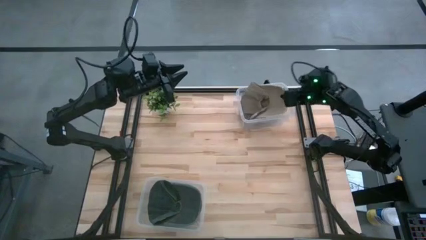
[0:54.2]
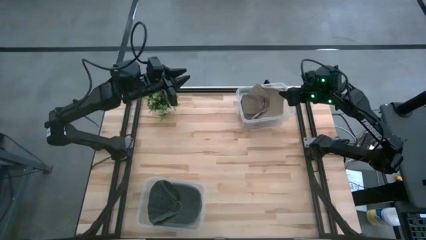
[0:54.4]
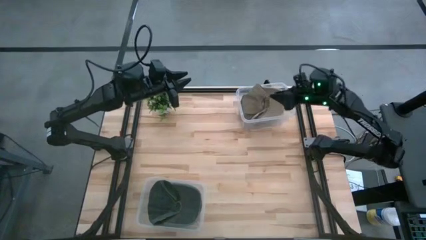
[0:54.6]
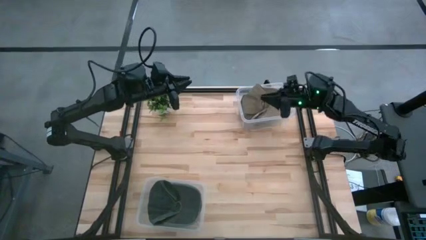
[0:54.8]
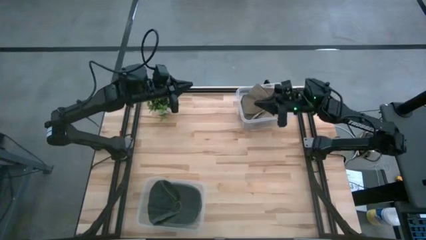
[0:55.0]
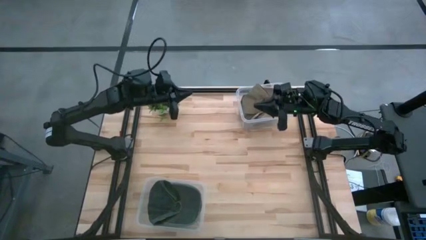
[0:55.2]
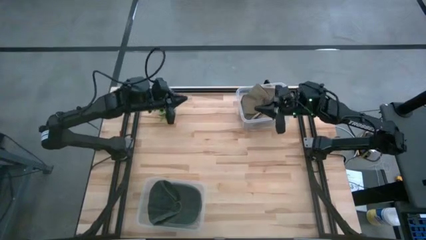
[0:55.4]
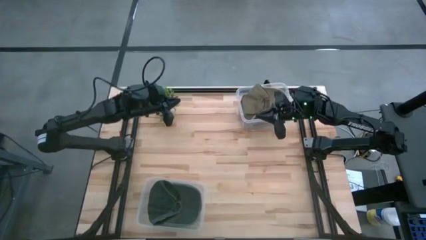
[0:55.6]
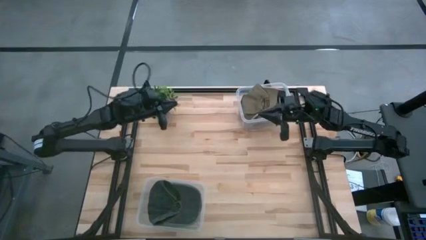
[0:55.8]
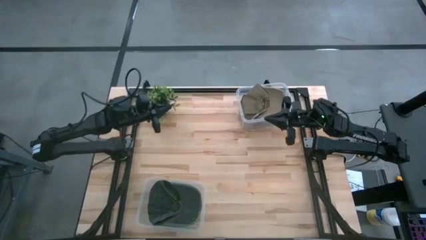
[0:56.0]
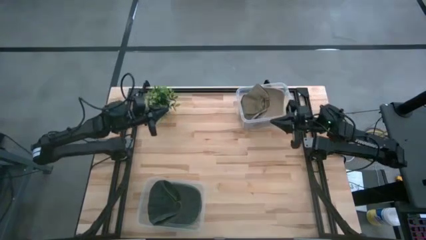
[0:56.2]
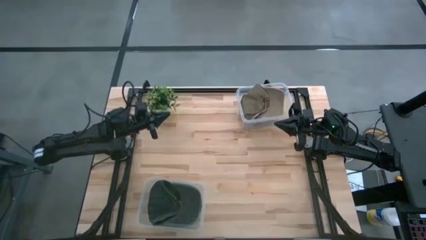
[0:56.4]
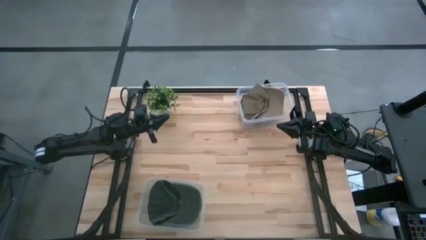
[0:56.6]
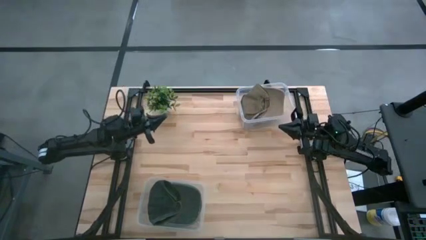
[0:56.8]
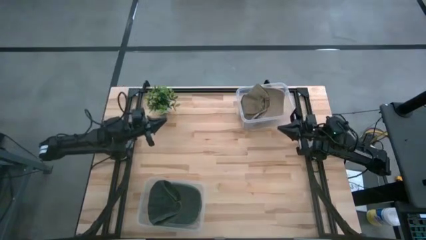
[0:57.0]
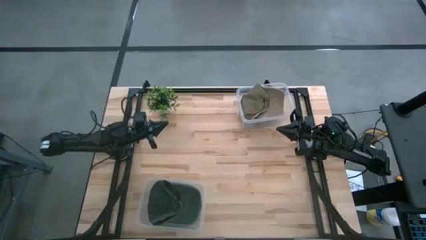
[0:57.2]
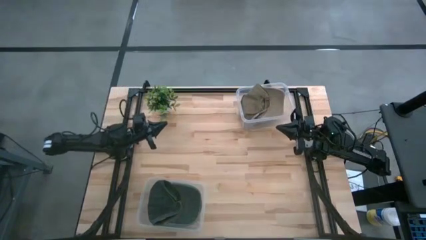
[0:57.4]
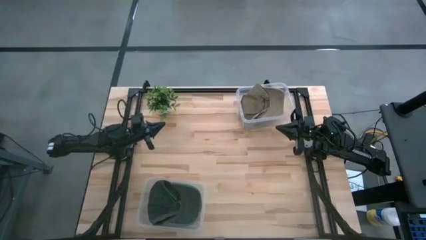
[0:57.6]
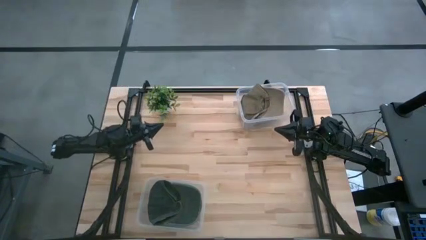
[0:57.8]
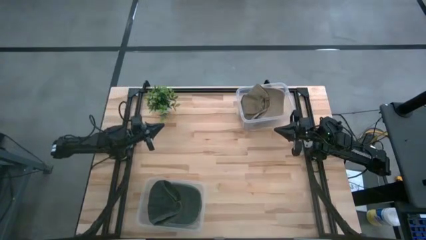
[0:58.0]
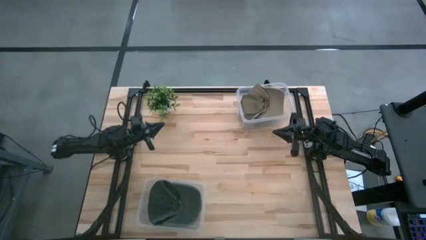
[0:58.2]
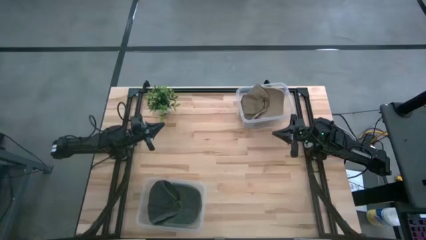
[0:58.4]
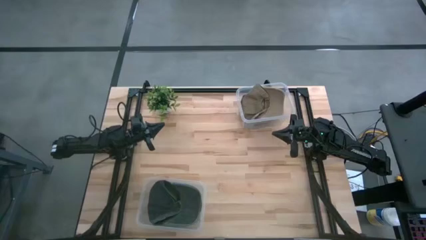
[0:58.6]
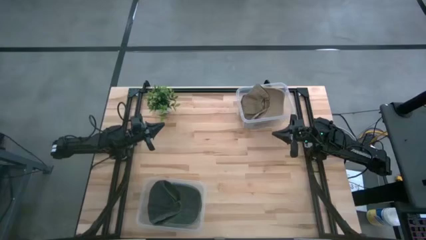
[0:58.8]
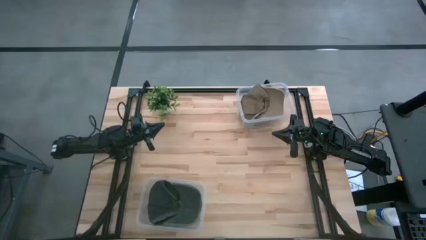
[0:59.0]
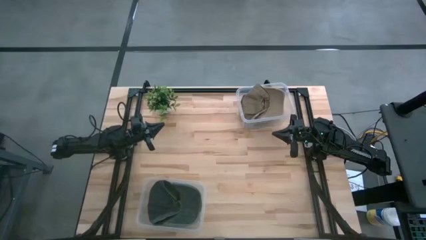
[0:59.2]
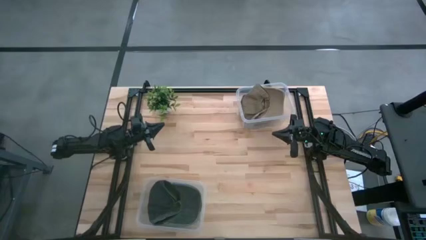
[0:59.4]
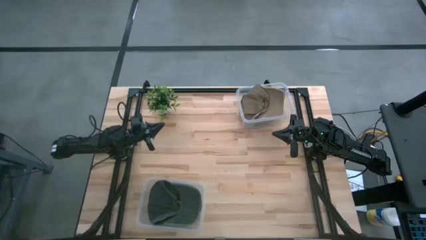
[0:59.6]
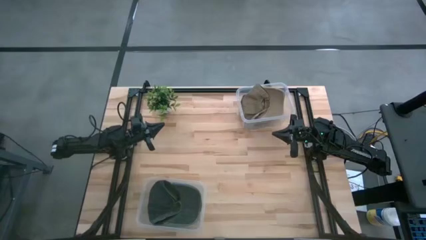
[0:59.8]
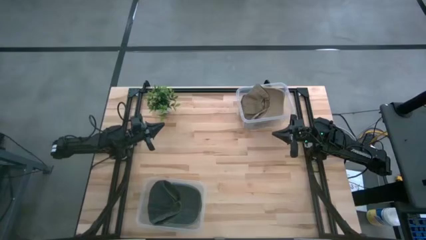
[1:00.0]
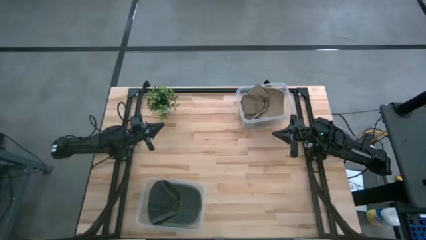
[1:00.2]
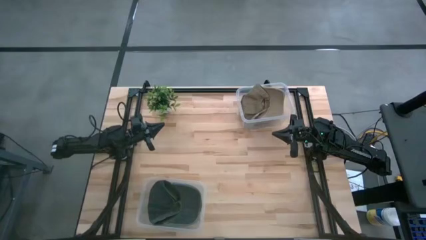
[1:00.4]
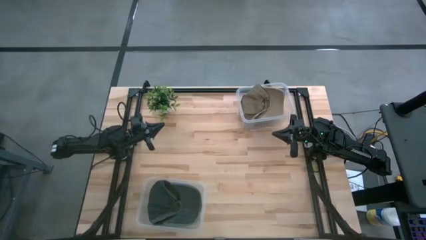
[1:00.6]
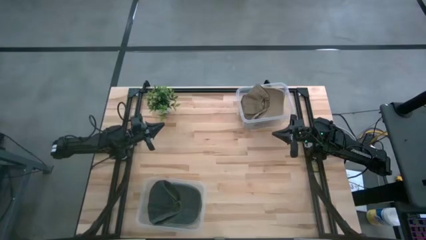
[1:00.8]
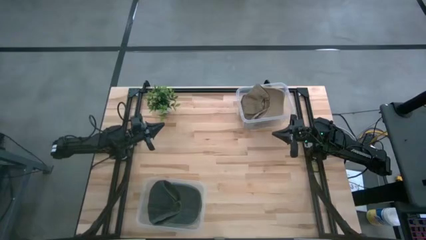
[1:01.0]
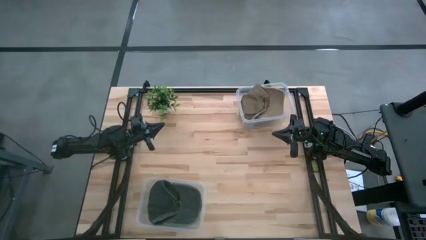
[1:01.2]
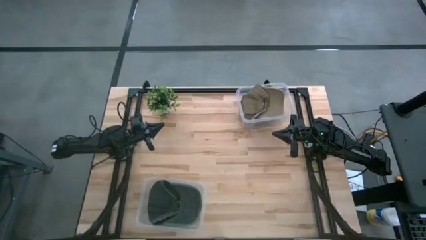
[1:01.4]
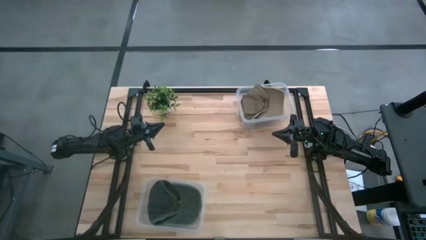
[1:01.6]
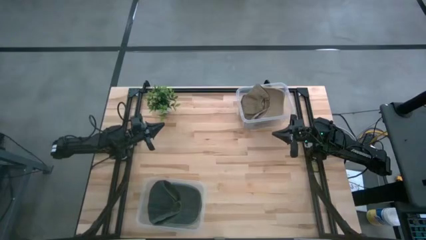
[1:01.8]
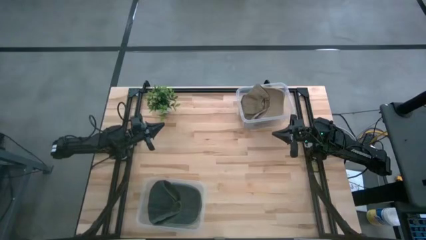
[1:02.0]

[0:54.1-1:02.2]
Task: Pick & Place hat
Return to Home Position

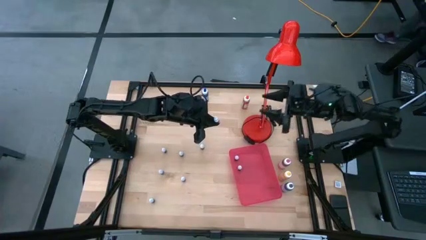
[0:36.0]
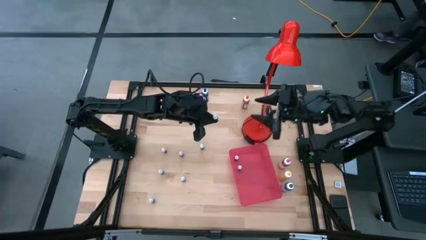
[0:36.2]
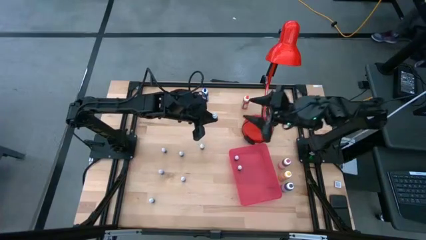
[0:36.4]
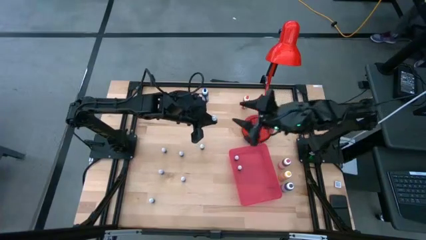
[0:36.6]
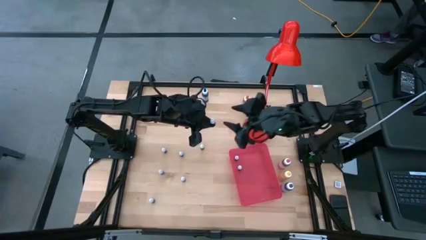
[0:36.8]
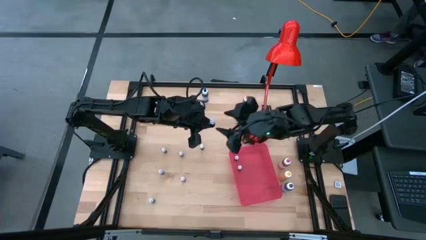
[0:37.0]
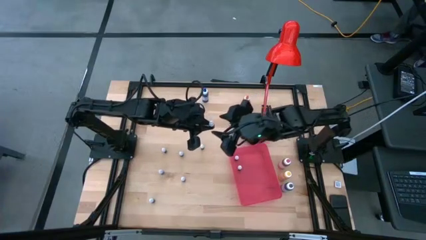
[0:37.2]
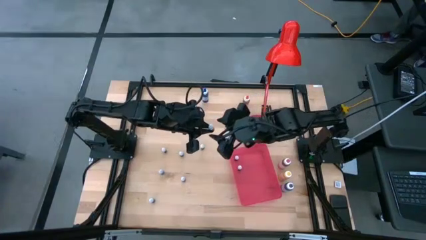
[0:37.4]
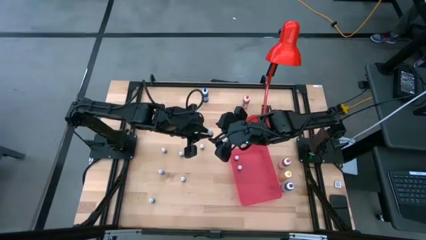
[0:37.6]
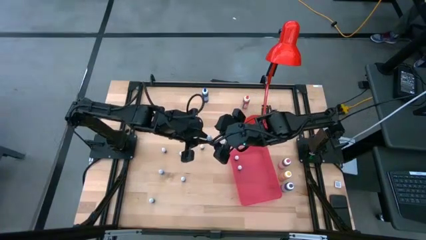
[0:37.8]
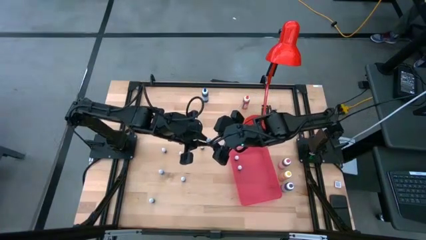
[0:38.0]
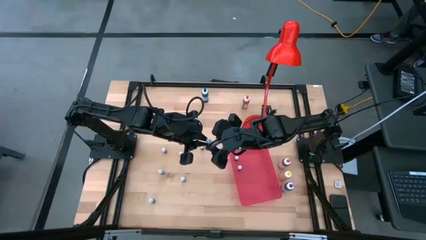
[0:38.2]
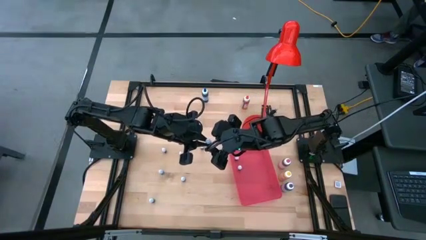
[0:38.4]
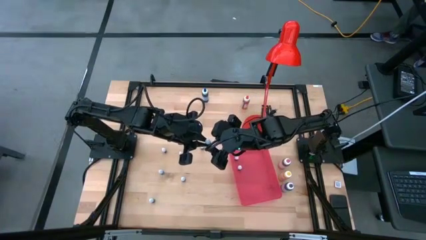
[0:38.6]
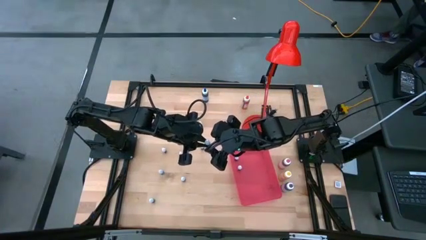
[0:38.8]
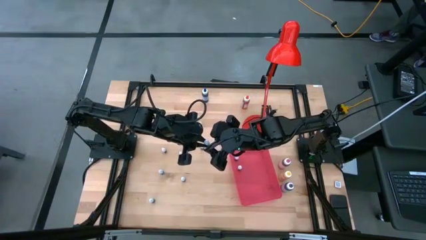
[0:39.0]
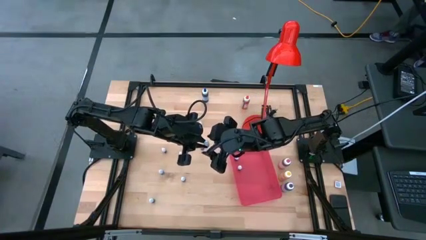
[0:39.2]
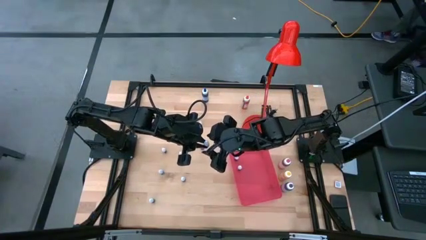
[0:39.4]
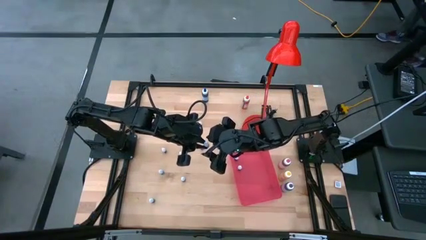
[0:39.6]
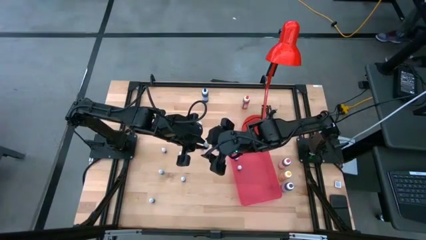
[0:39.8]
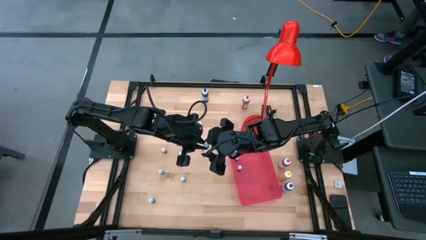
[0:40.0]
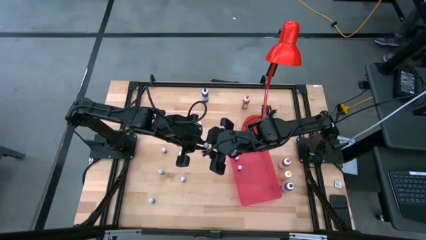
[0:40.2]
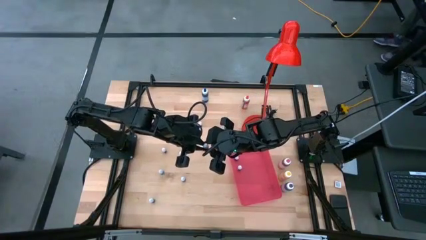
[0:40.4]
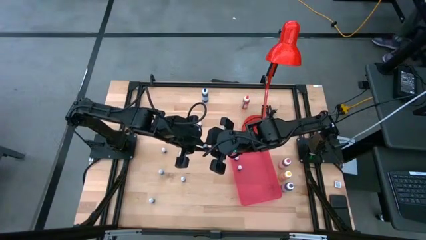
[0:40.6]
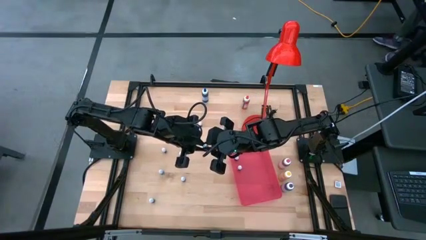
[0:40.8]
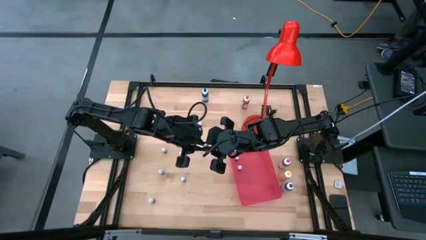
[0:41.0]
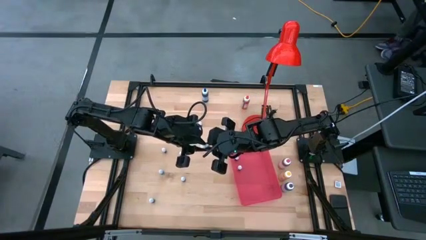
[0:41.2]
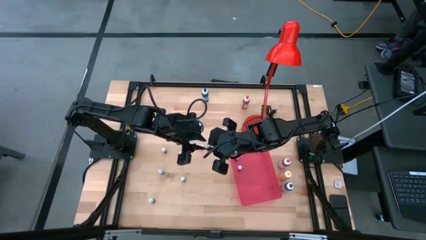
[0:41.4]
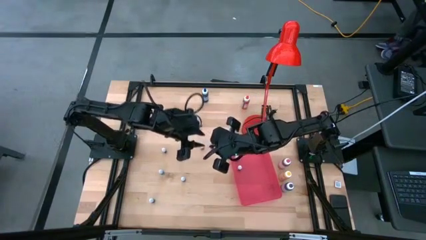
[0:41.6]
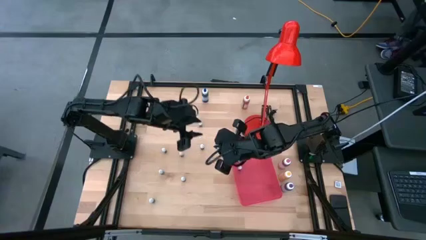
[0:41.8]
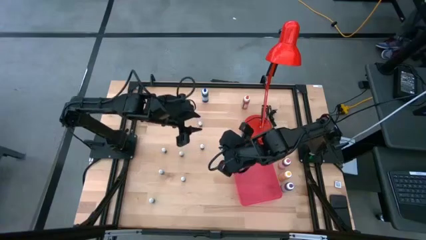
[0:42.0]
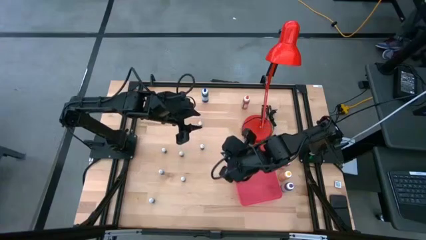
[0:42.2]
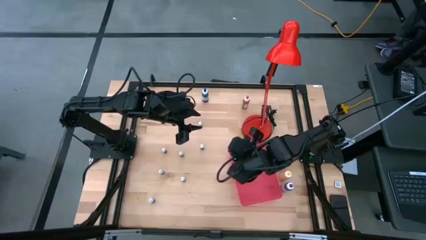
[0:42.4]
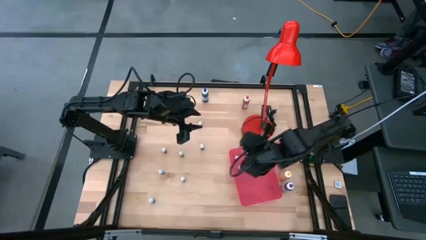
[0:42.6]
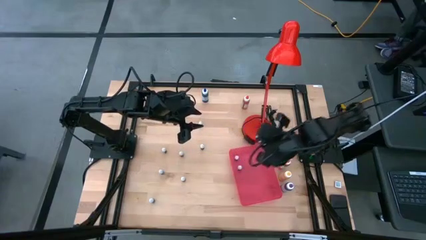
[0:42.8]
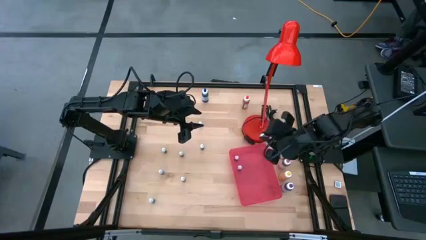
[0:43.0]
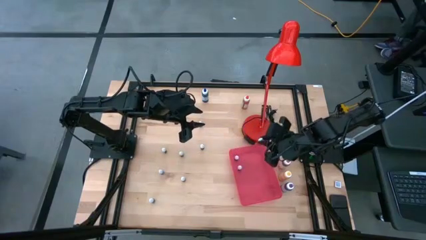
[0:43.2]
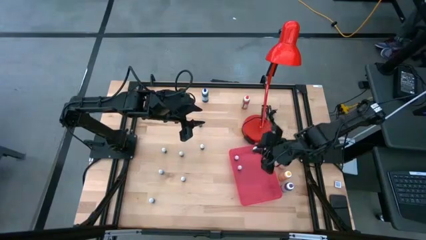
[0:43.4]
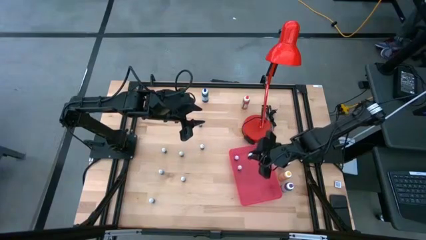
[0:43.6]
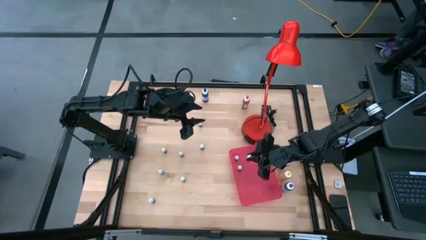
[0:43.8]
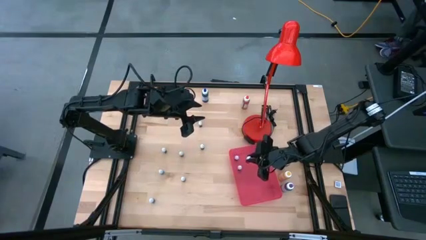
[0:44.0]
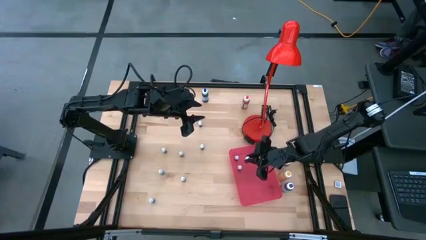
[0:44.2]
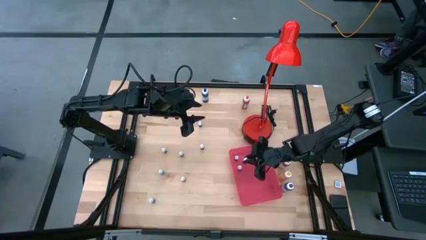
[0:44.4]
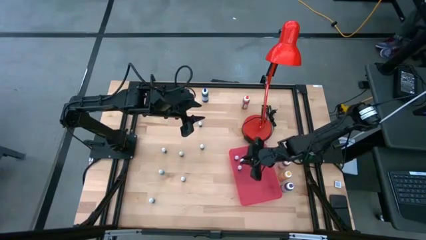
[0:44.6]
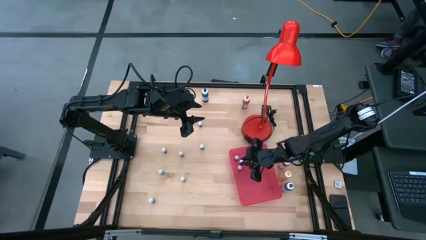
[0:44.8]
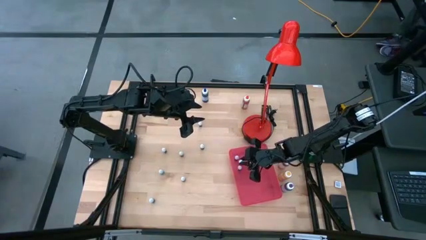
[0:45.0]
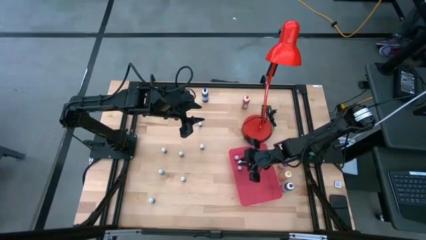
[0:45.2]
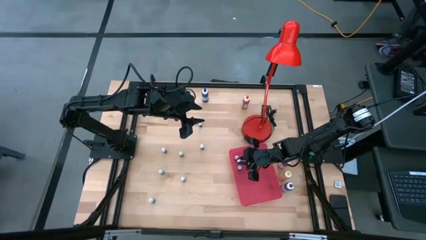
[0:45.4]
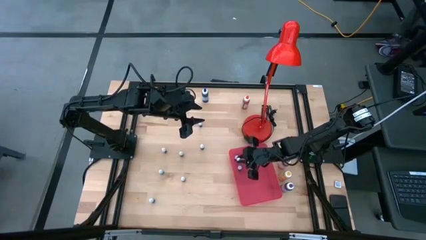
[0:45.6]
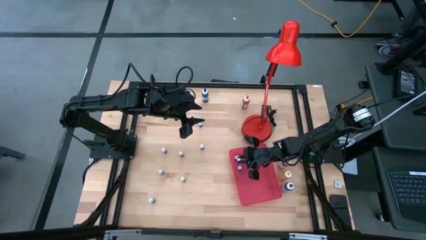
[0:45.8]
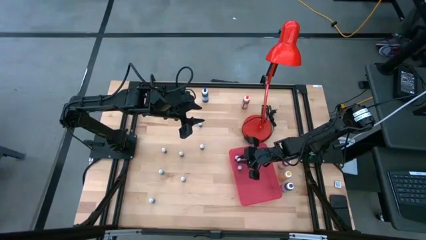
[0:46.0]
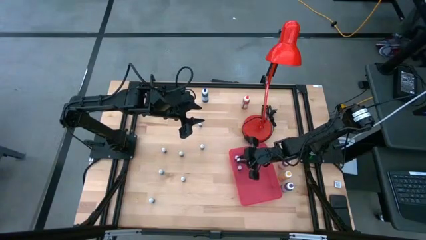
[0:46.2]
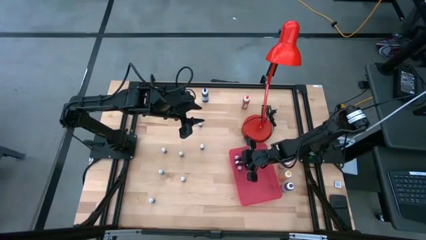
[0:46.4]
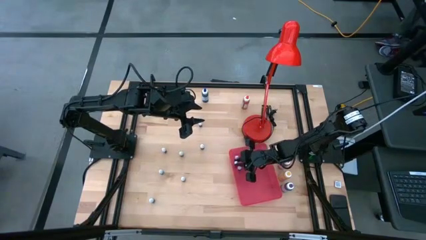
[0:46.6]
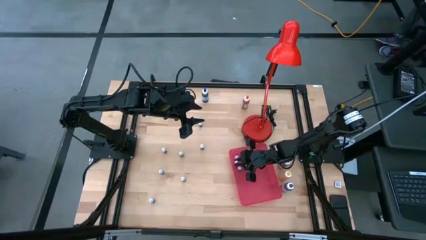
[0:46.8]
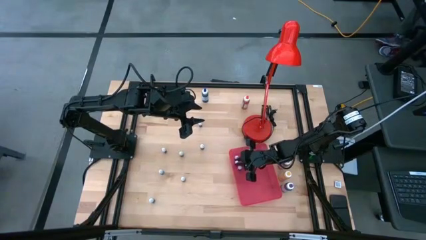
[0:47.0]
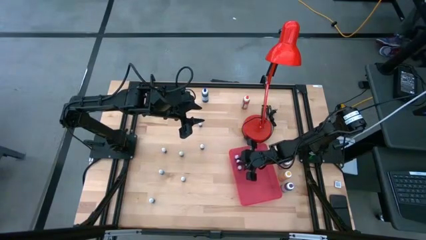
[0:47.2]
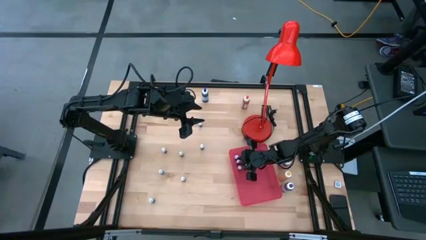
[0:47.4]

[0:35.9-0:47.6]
Task: Pick & Place food coloring
Put the small orange food coloring bottle into the red bin
